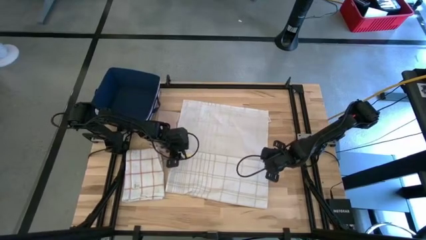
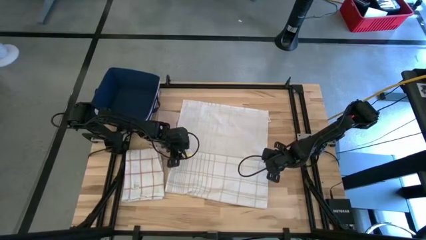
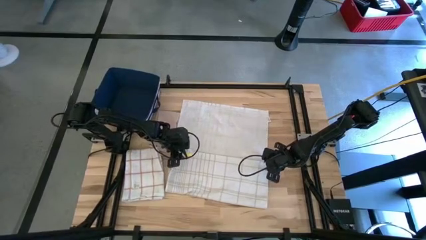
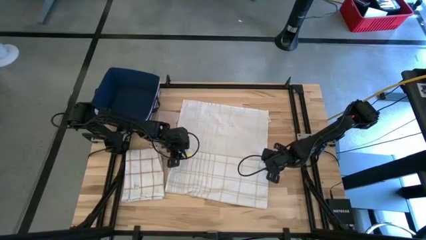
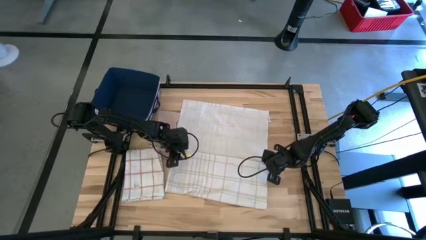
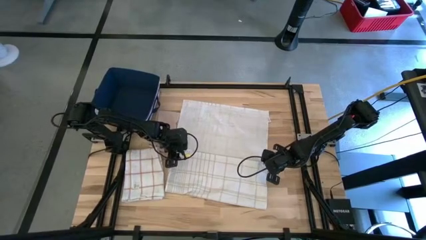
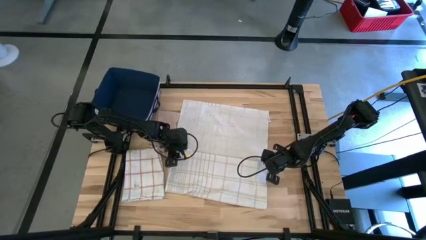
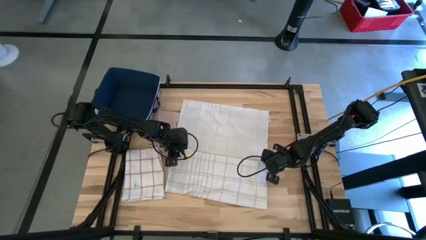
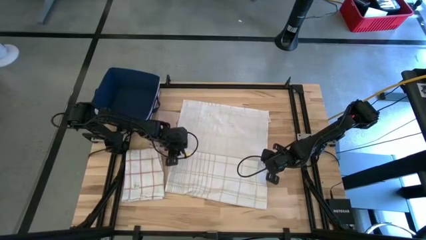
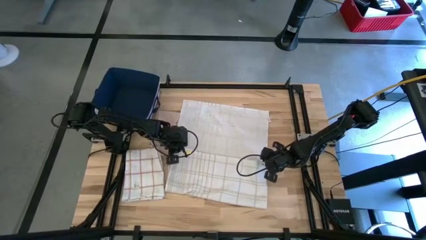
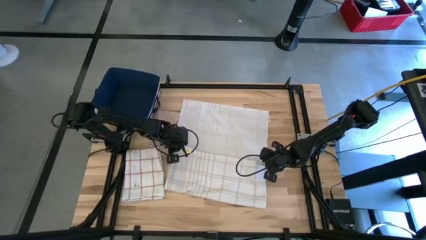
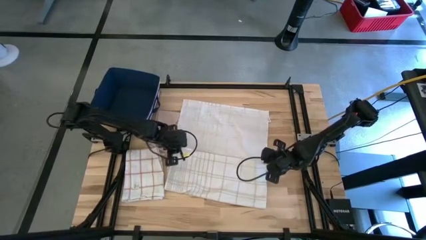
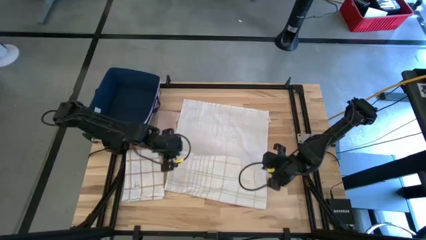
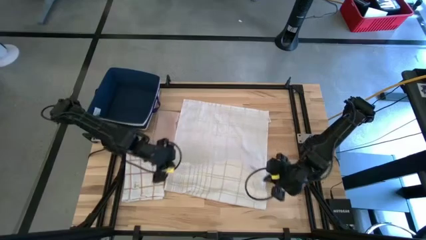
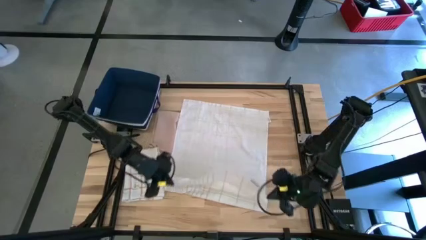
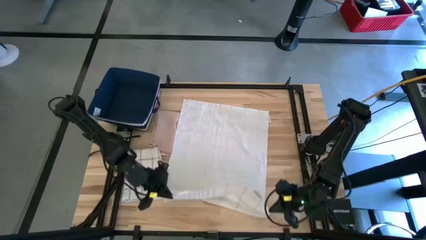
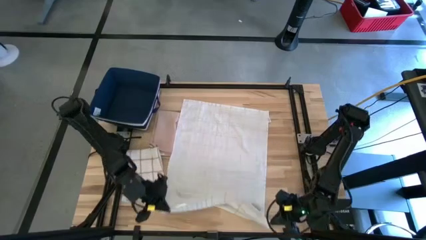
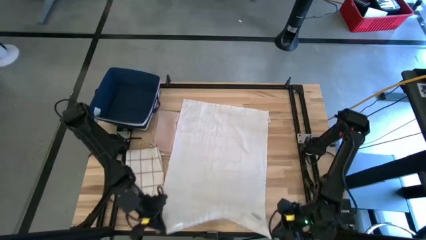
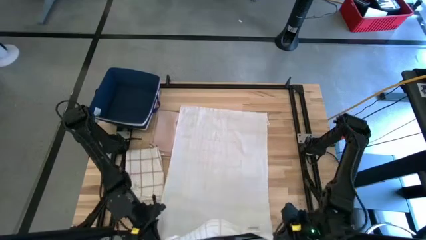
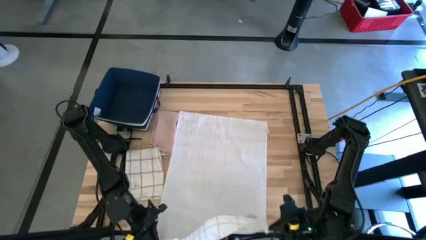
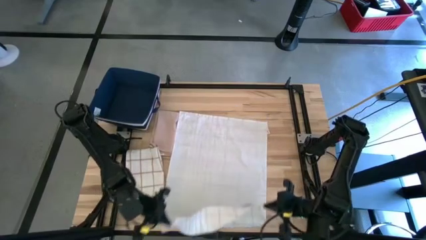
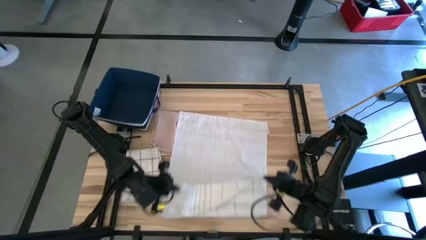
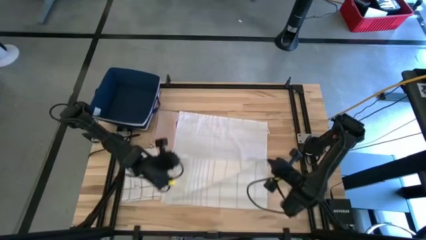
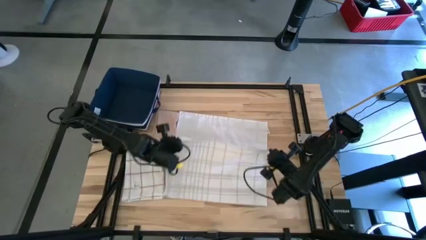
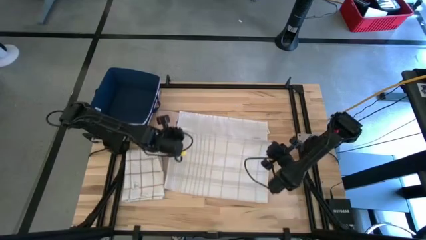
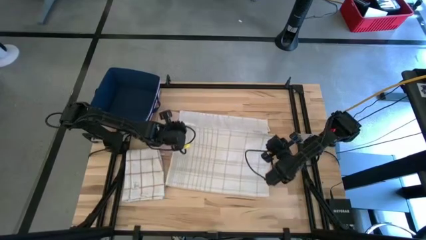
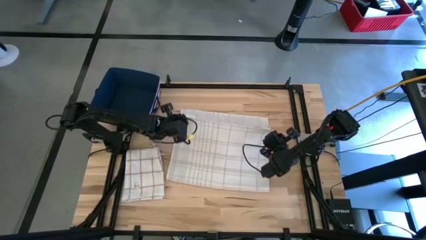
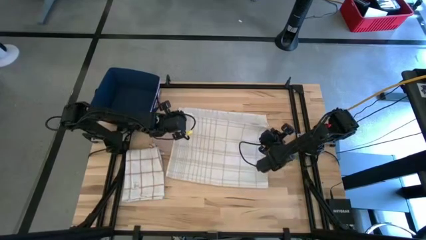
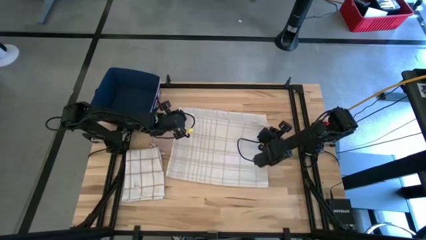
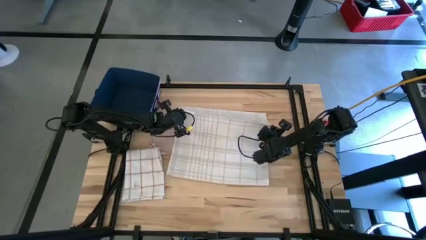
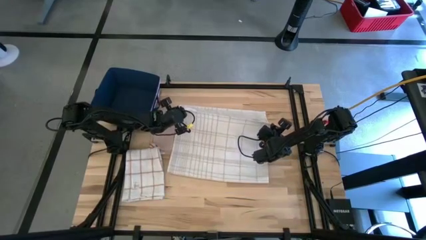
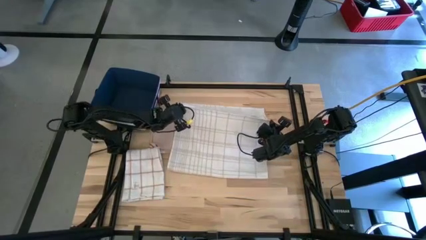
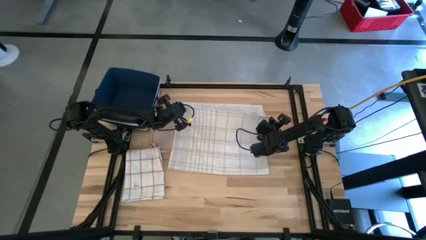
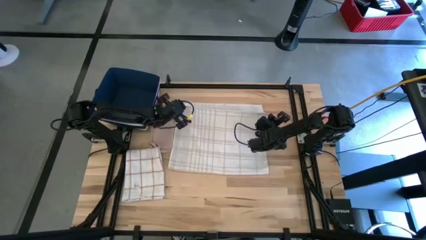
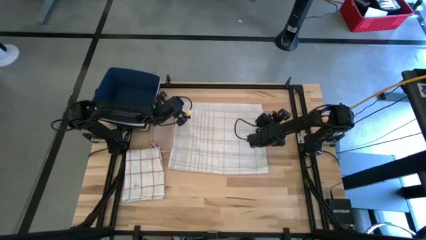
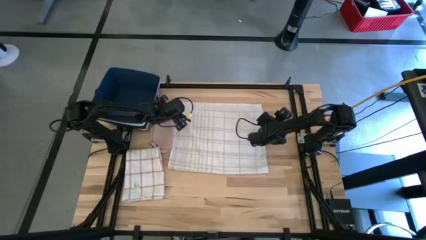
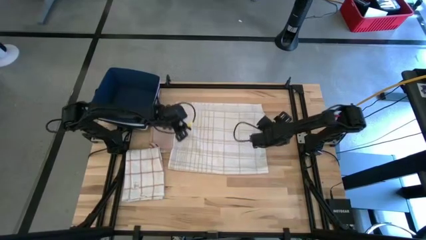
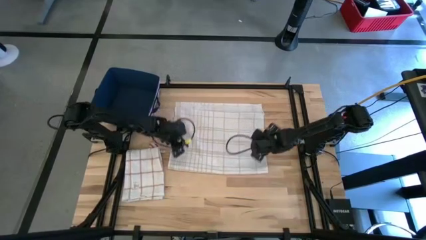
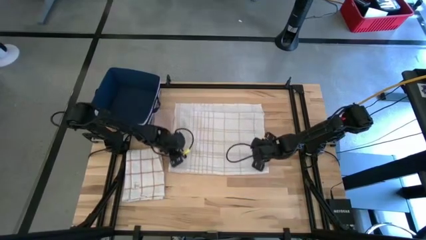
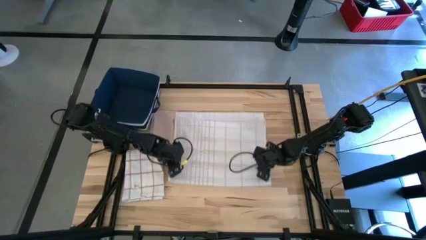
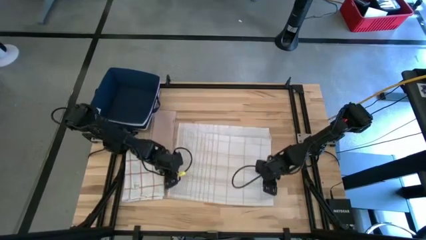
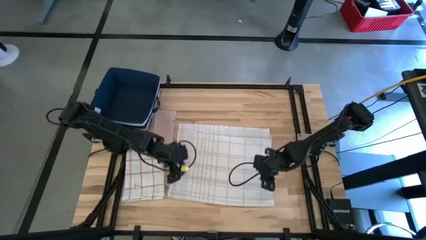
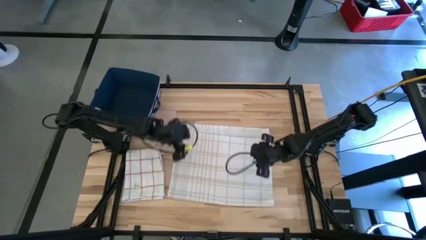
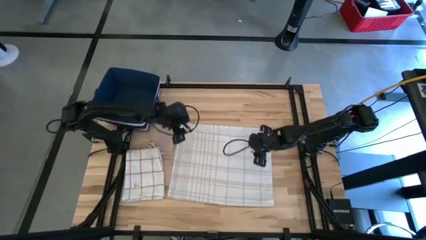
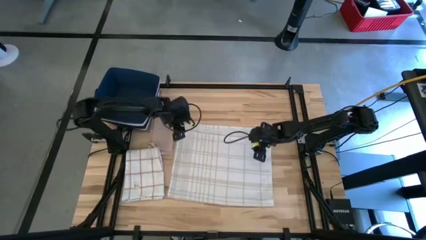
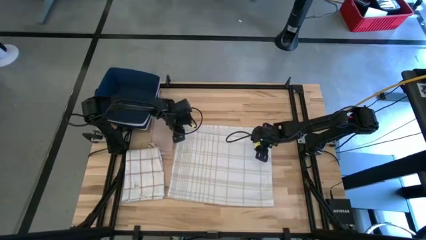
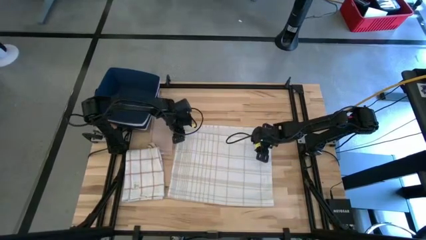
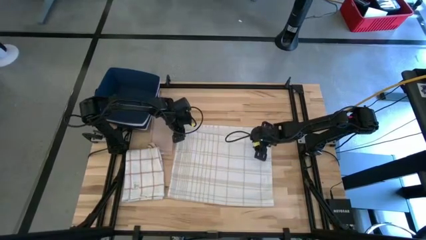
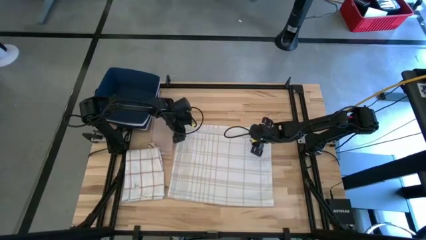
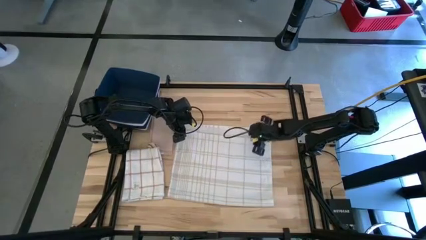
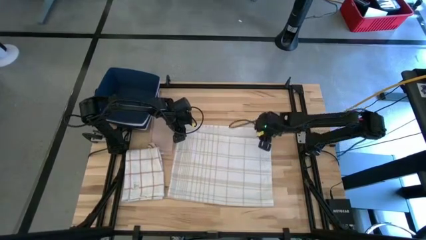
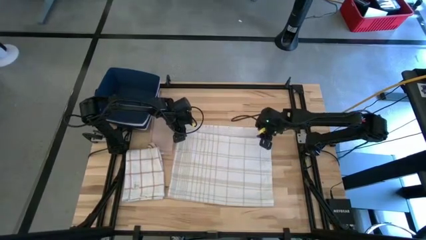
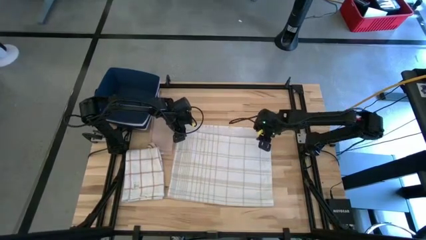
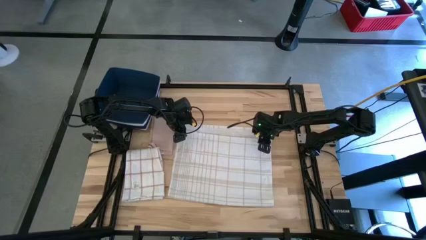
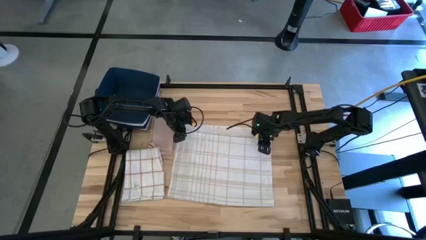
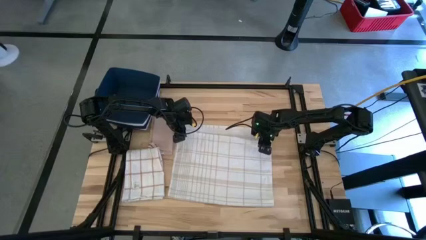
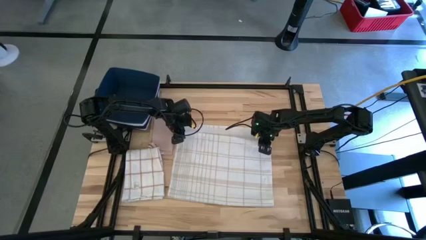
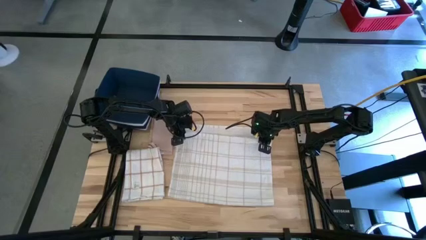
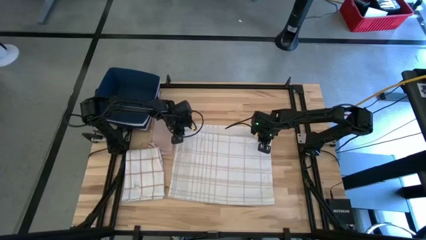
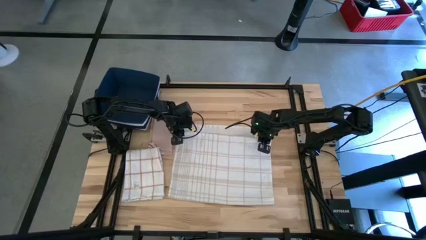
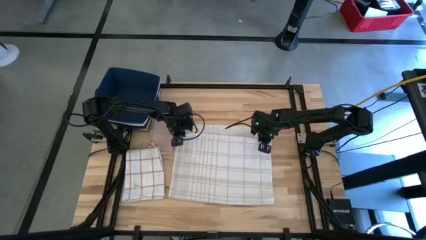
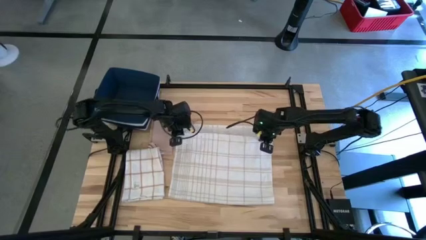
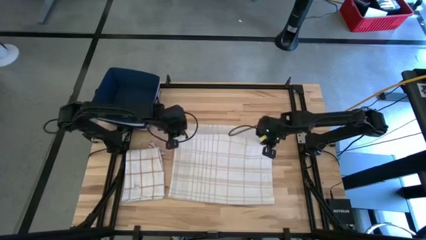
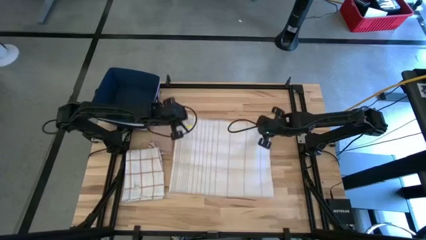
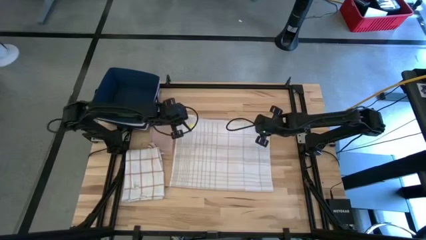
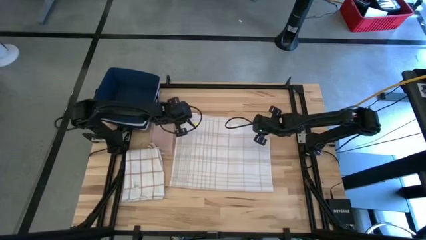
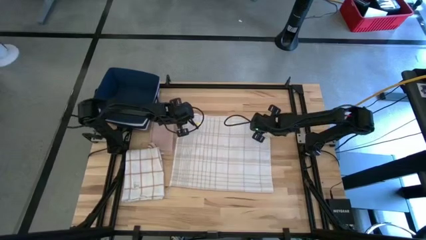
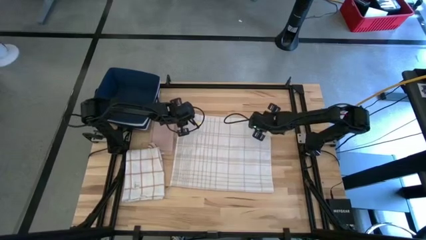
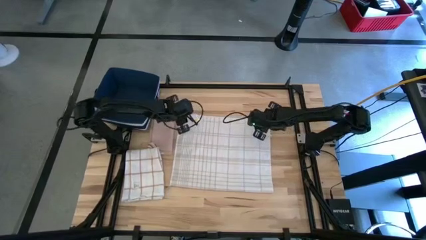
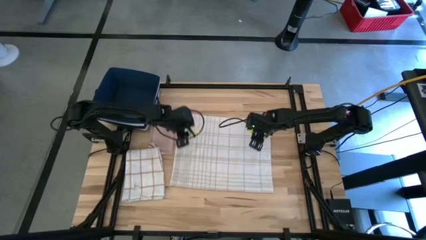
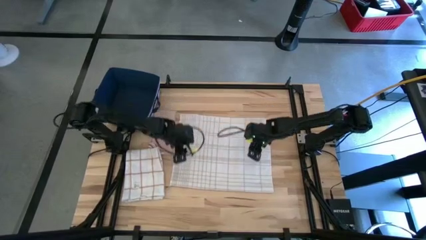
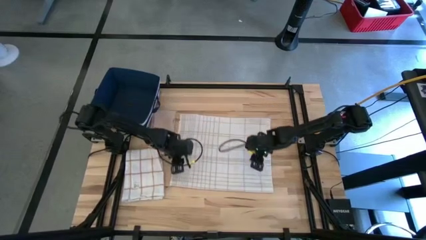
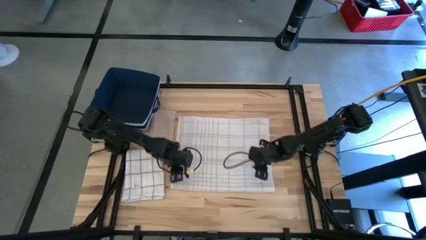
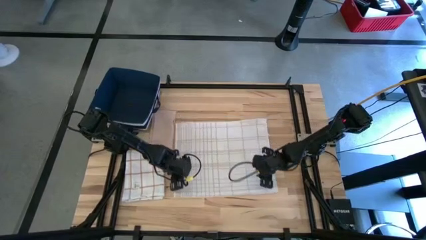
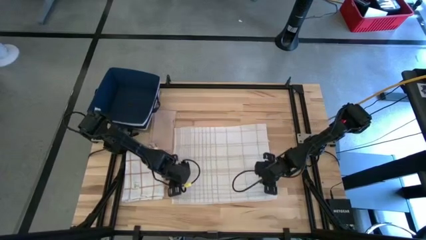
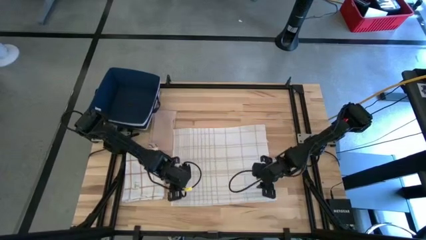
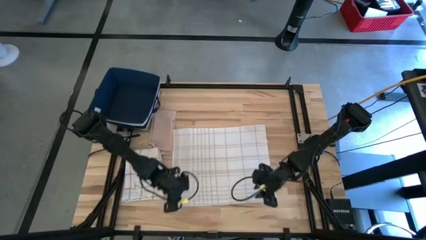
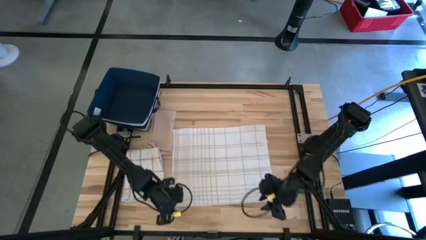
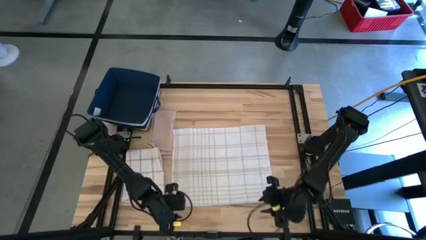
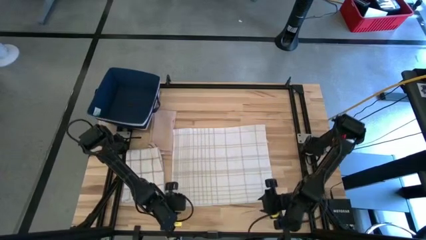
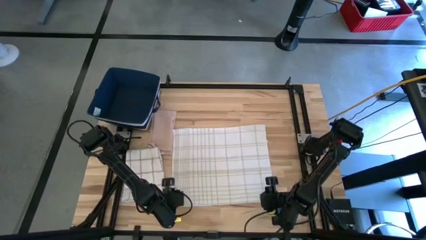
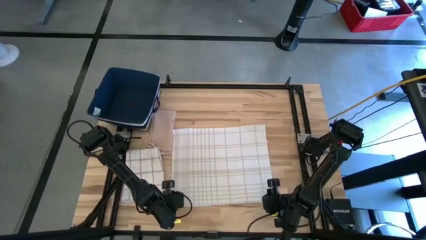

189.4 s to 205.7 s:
Task: Fold towel
Fold the right checkered white towel
